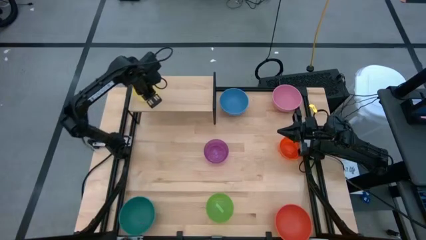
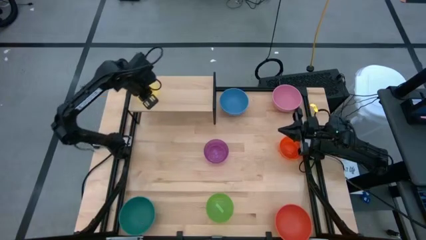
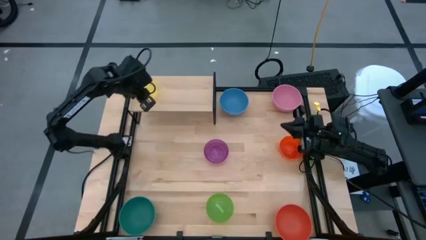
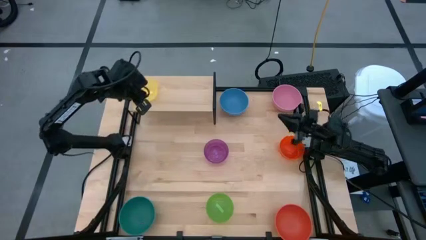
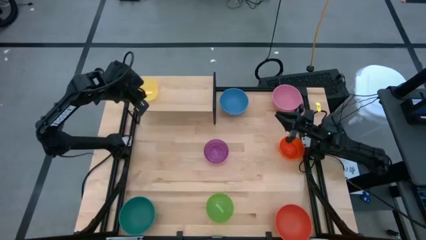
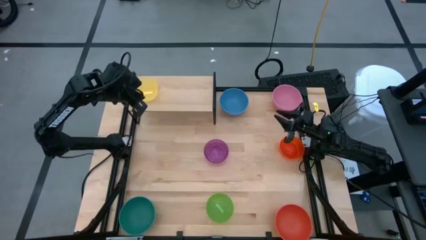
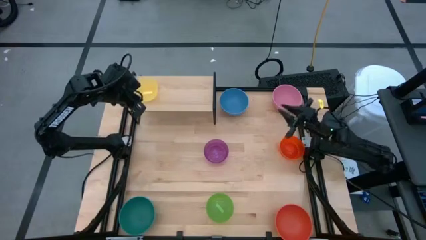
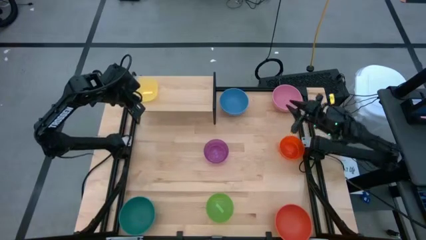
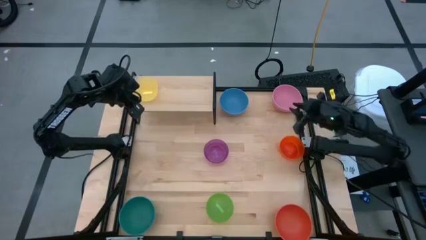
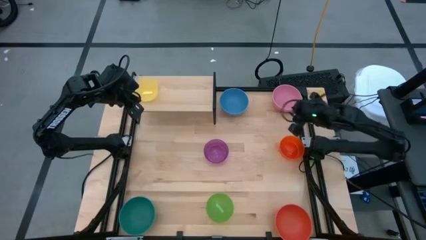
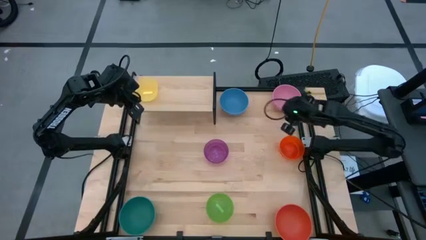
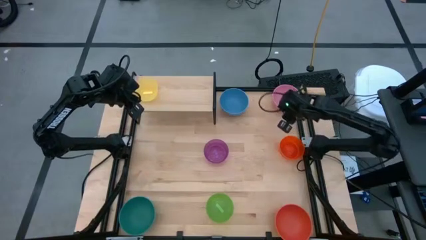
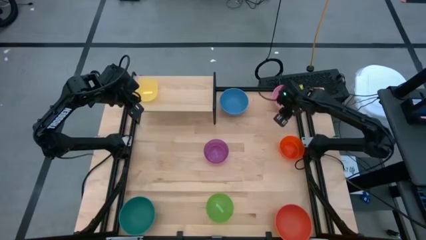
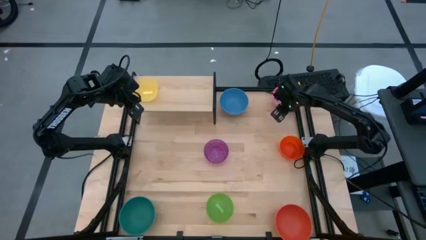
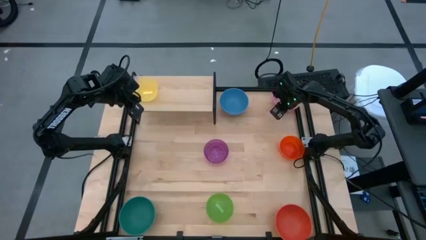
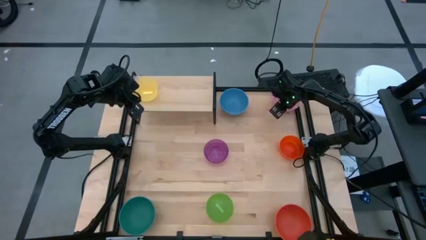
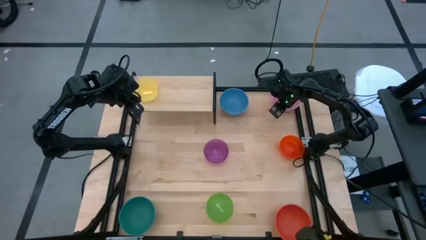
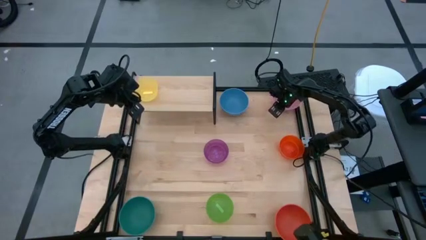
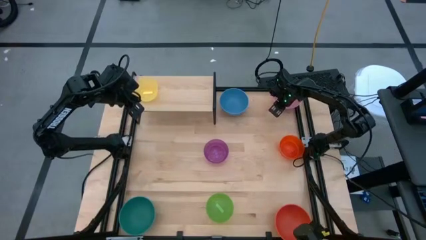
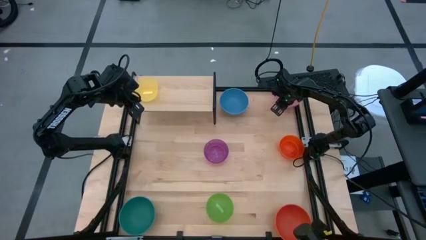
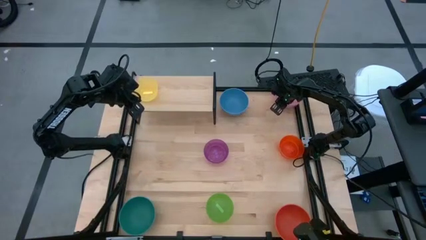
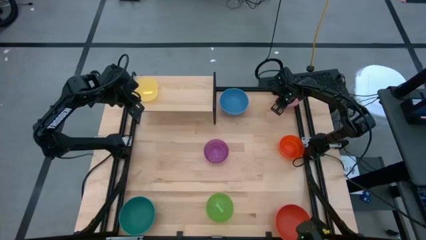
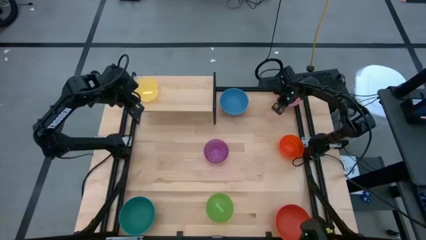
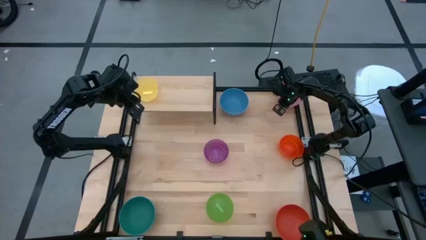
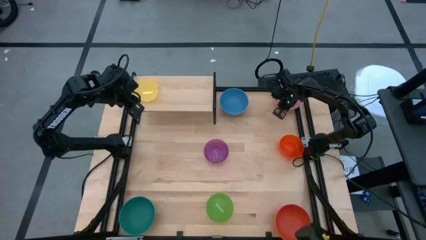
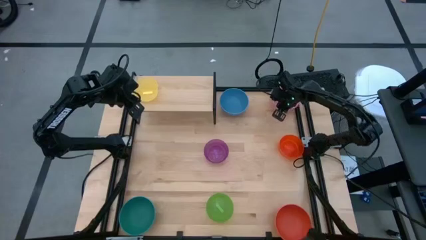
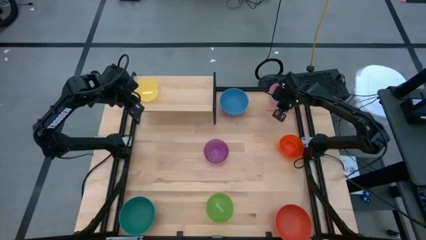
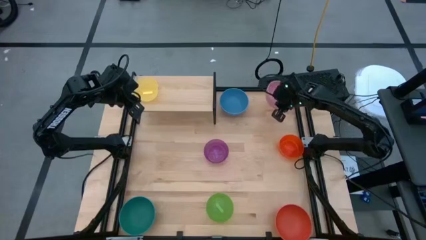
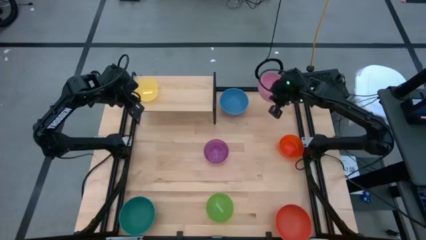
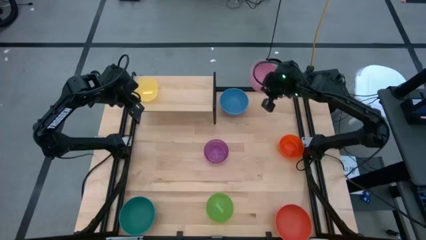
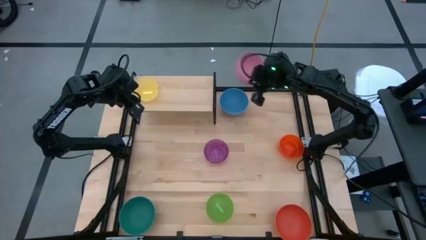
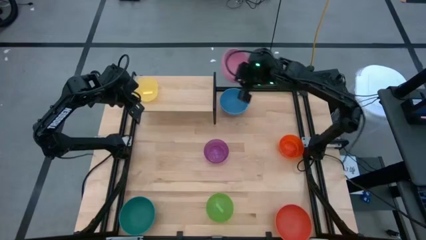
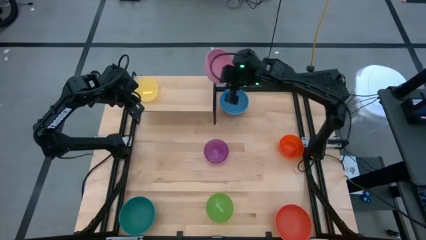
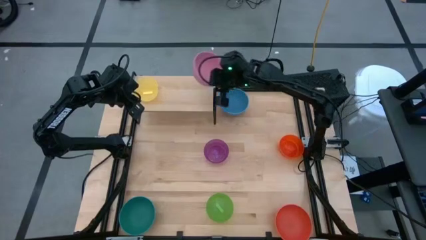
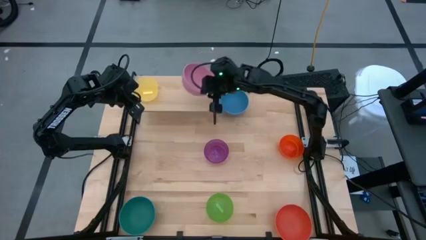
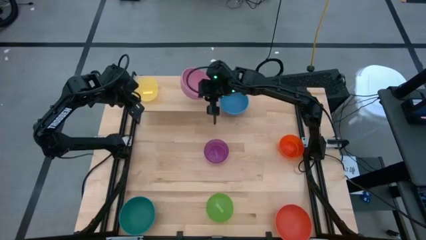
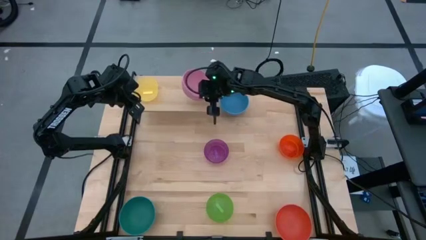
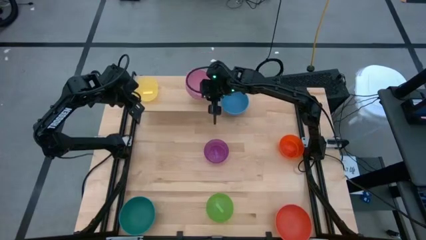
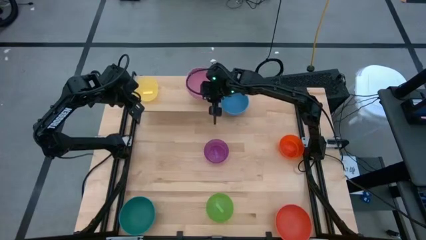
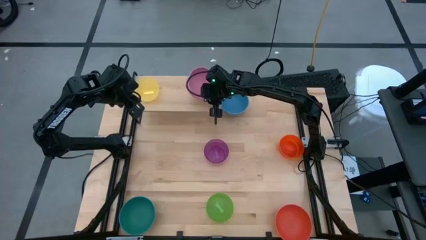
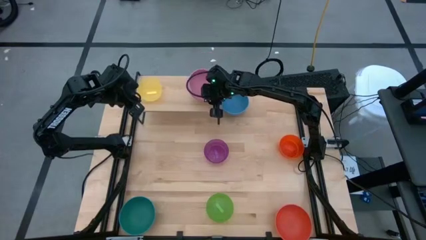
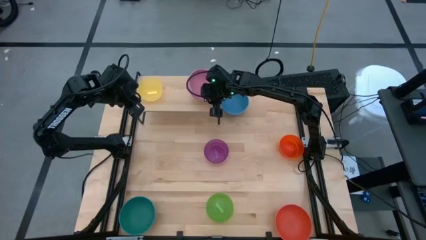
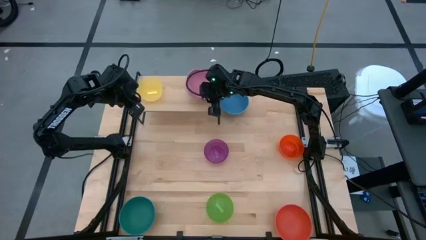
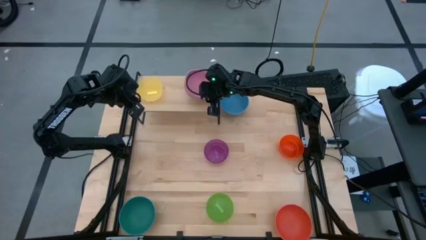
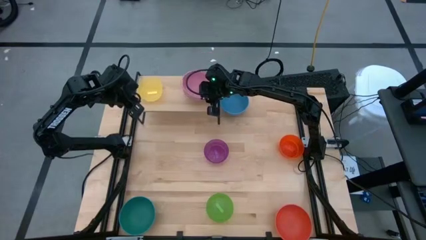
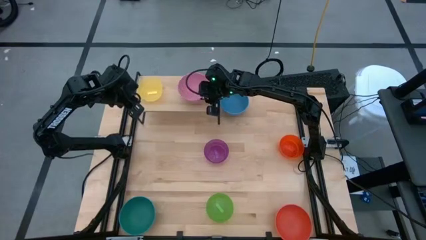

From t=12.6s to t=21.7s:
Task: Place and stack bowls onto a shelf
Put the pink bowl on the shelf

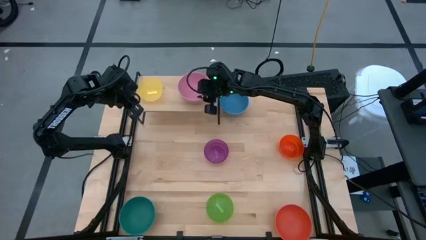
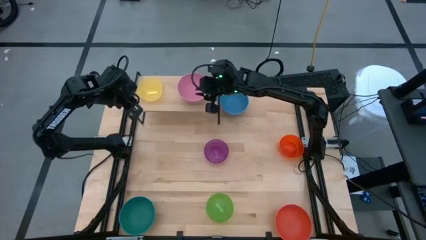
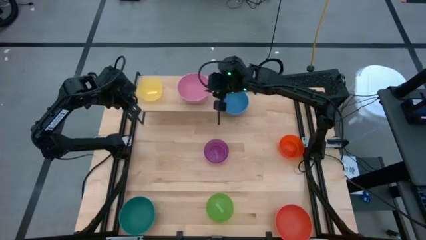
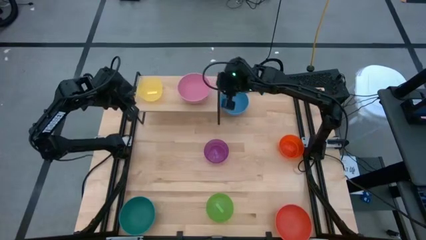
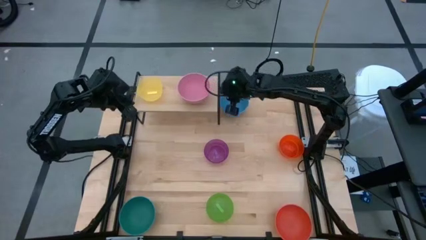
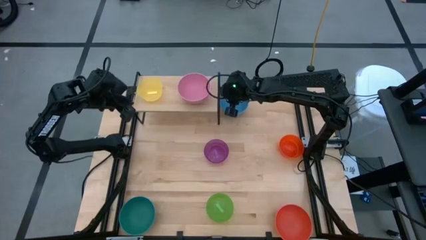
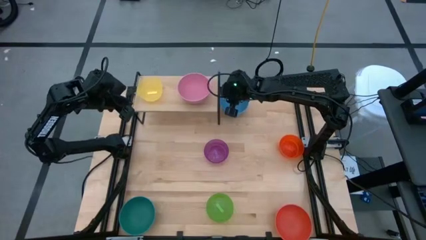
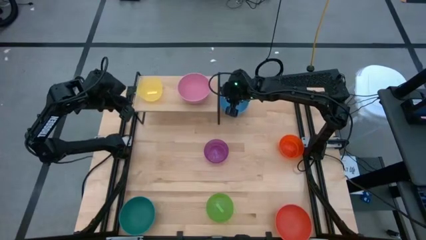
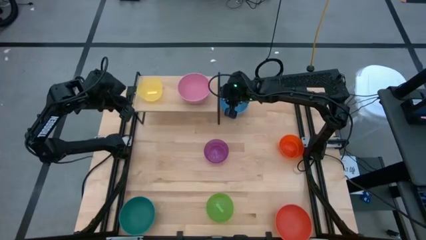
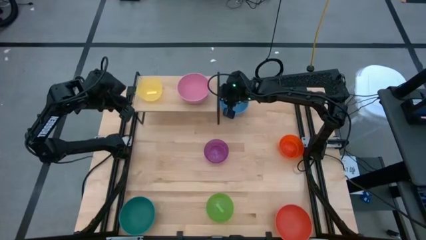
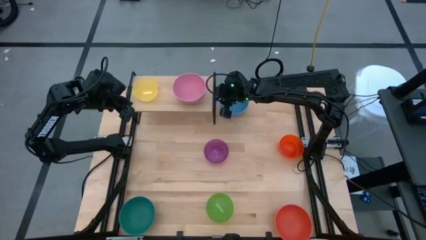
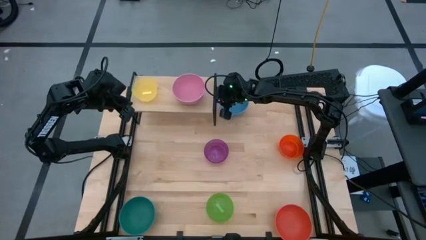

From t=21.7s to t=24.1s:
Adjust the shelf

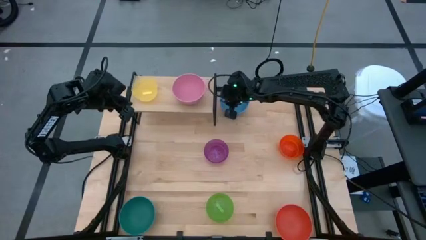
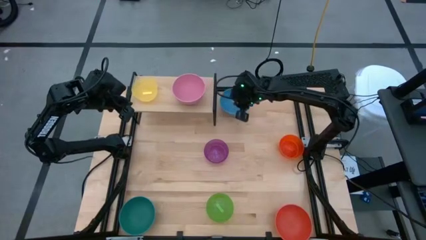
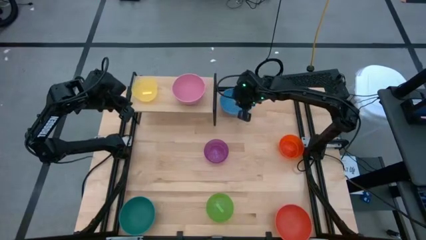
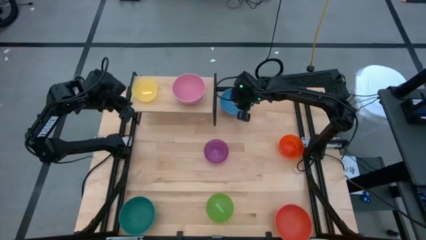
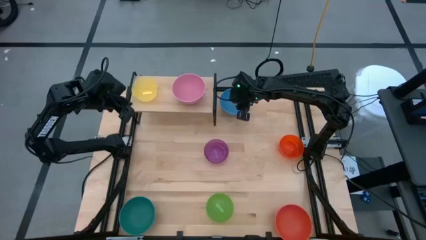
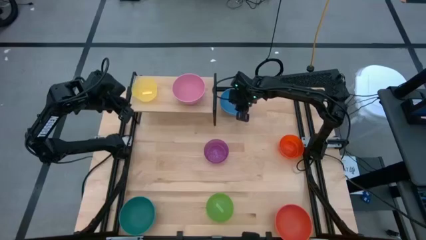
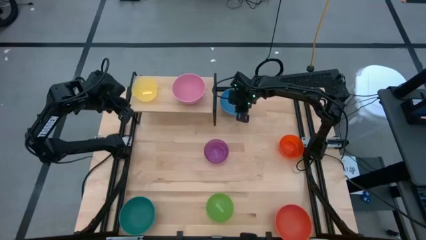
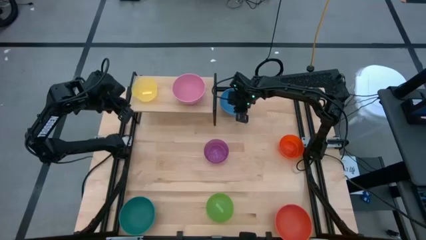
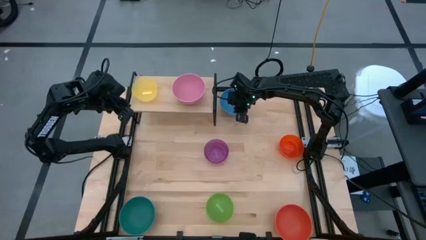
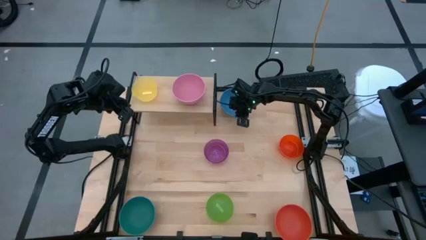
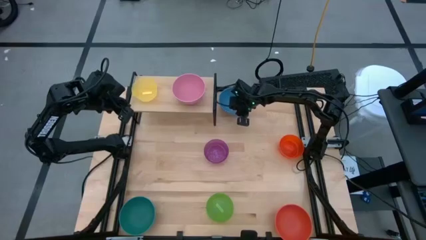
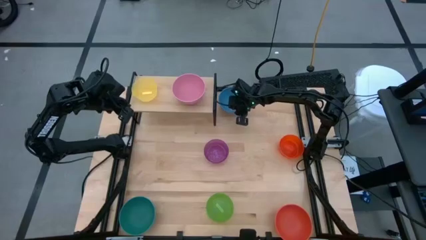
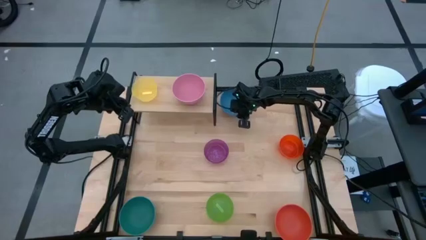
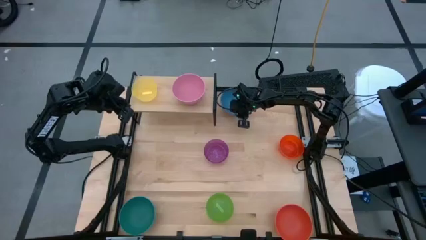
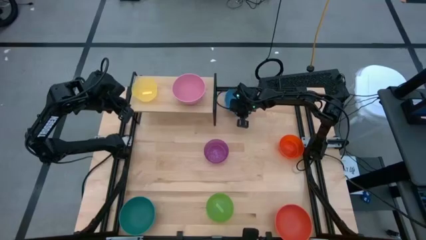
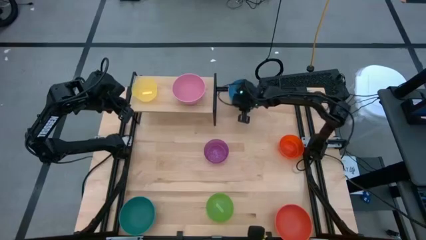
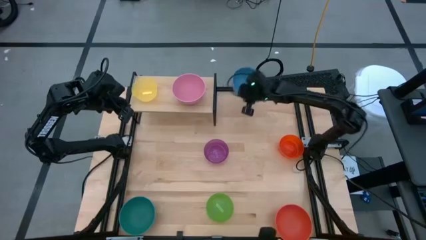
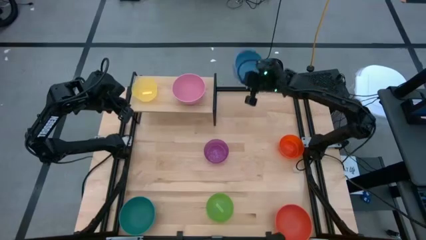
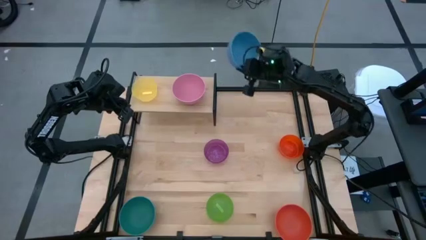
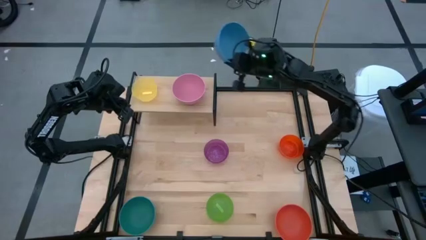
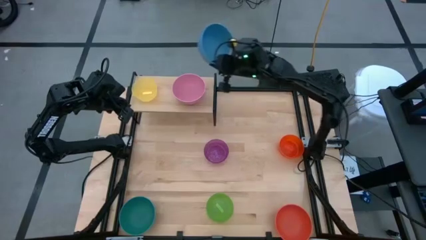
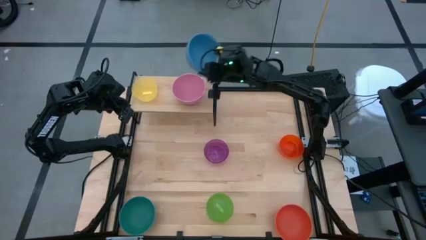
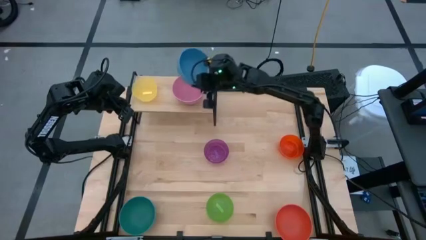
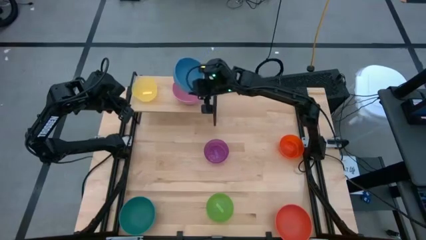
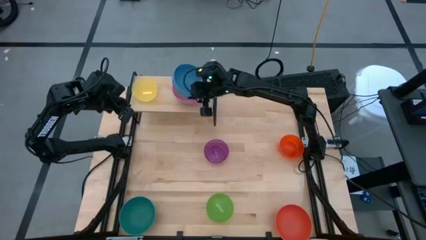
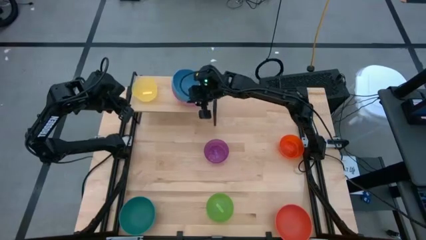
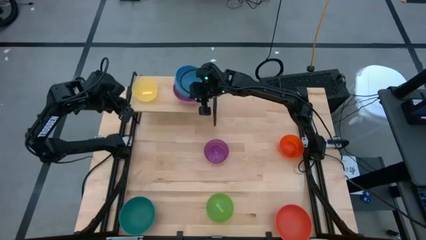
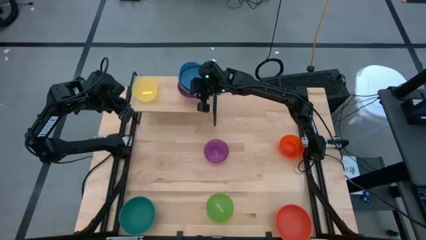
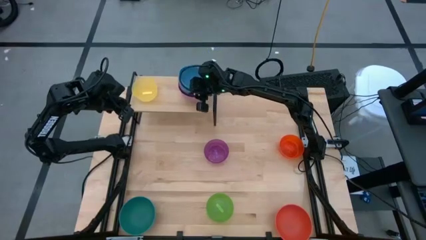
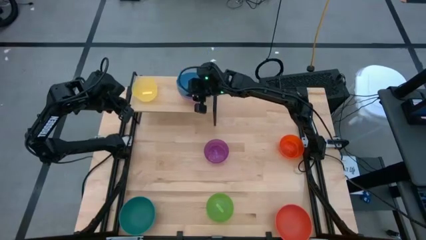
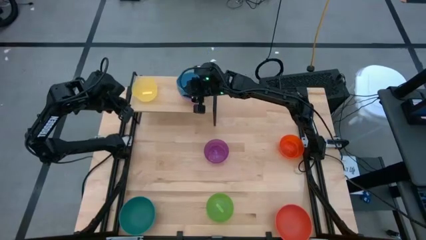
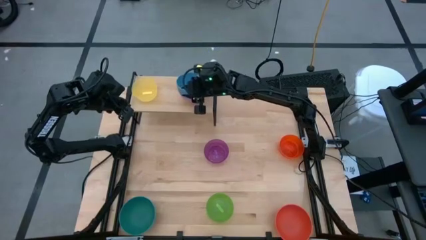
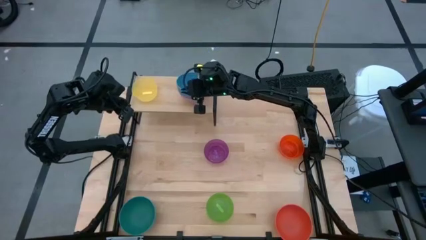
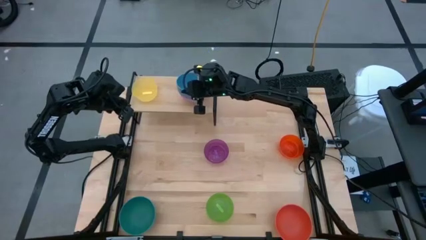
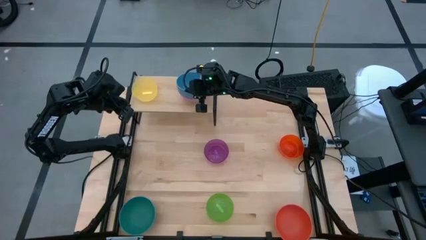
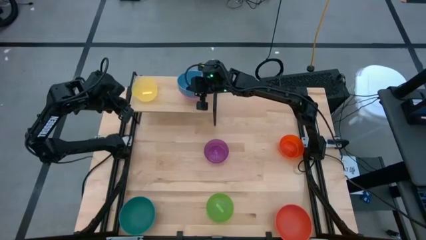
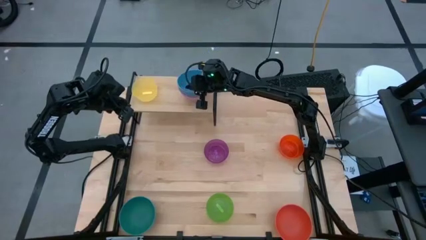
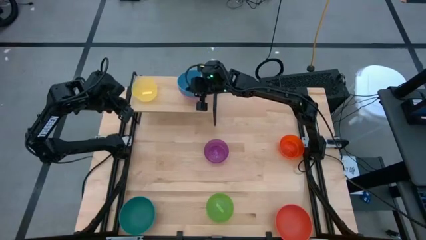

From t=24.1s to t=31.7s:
Stack the blue bowl on the pink bowl on the shelf
